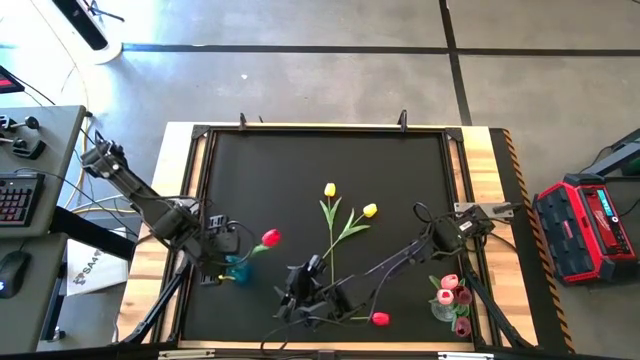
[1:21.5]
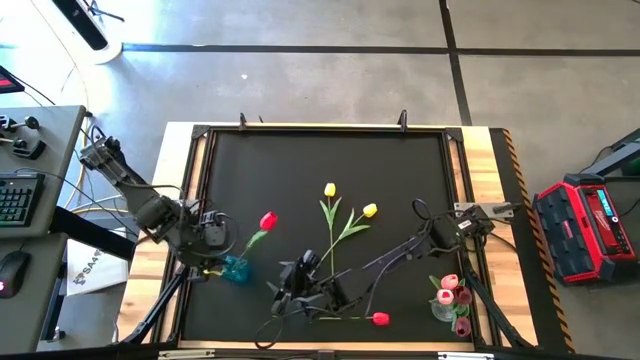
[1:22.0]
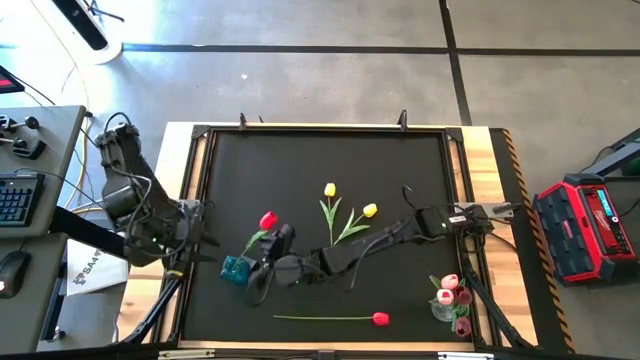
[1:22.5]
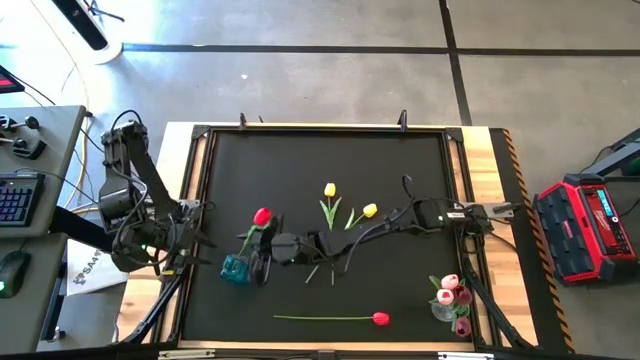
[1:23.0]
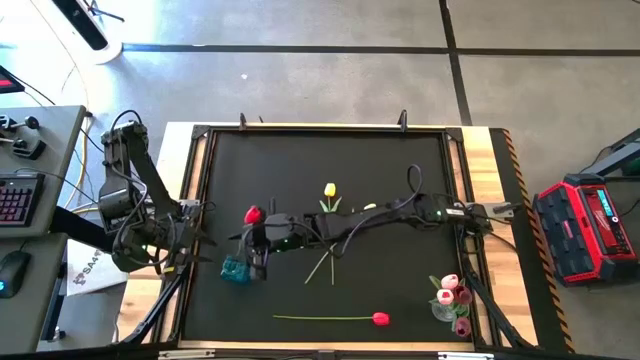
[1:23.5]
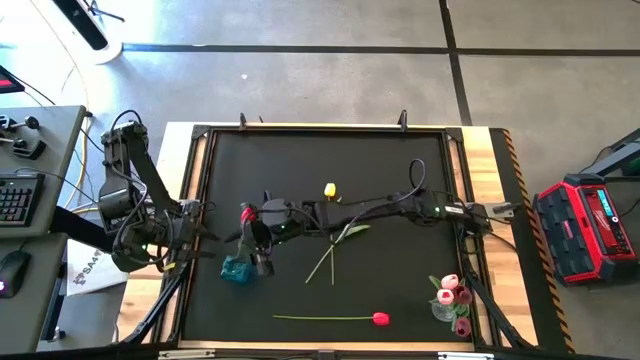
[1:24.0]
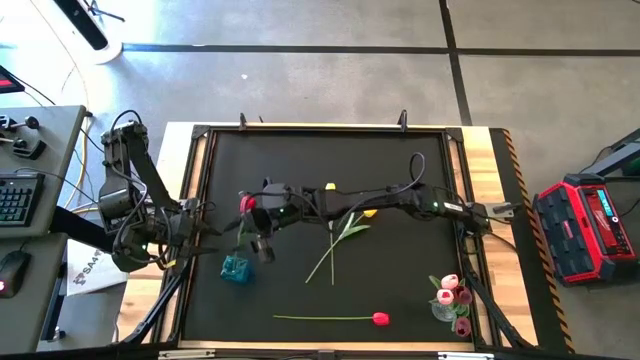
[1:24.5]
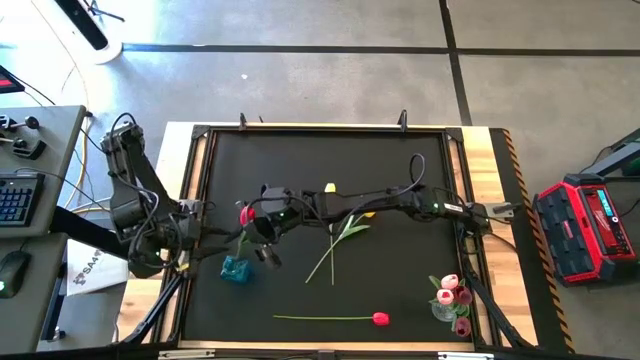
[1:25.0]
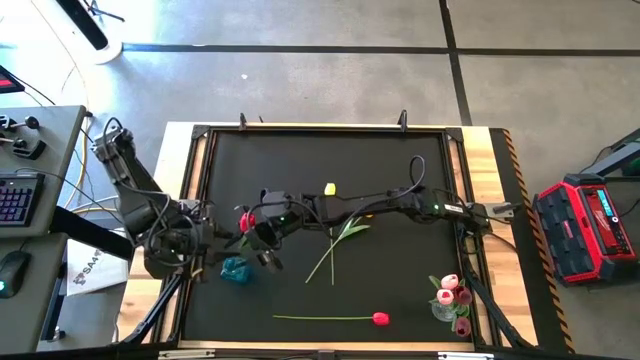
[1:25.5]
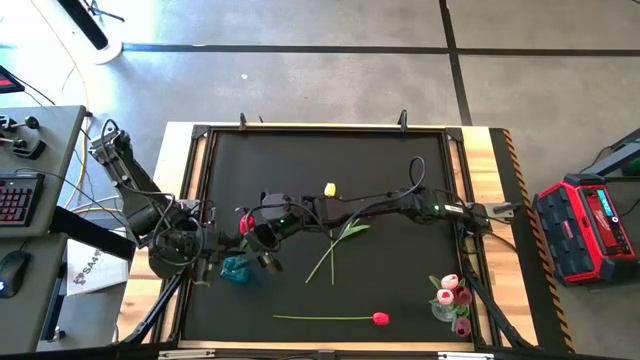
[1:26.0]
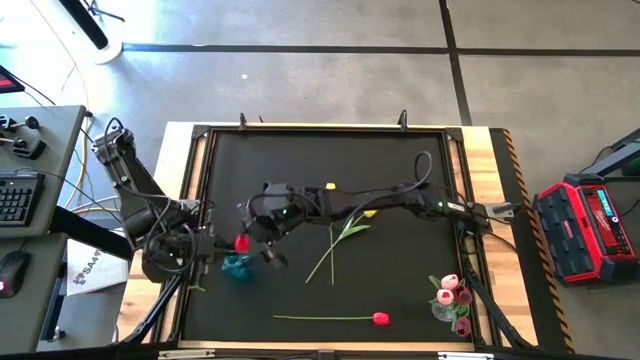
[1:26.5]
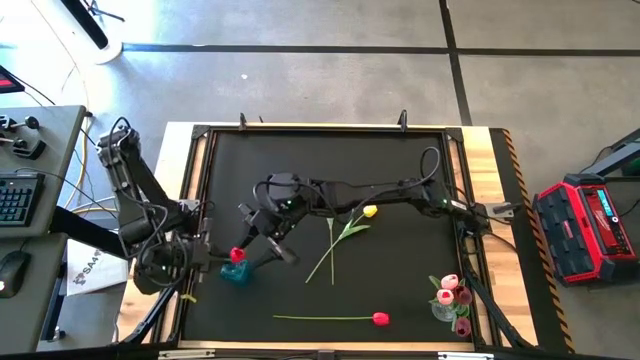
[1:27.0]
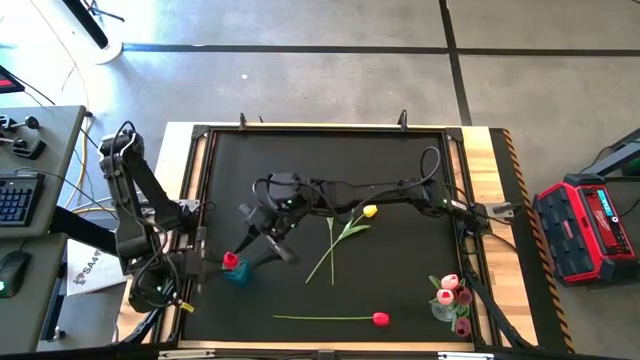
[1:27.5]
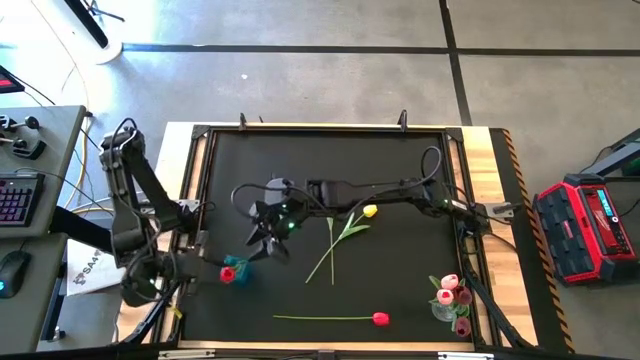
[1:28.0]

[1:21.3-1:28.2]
Task: Sort flowers into vase by color
Adjust the red flower in the vase

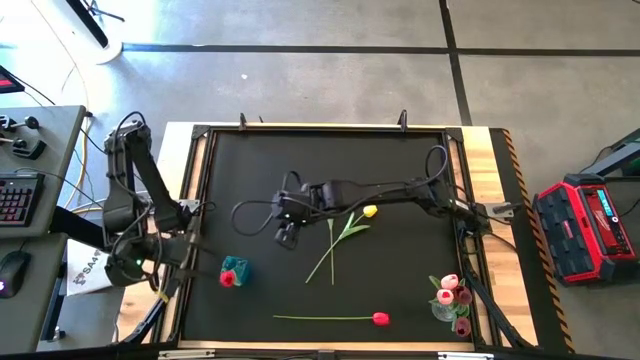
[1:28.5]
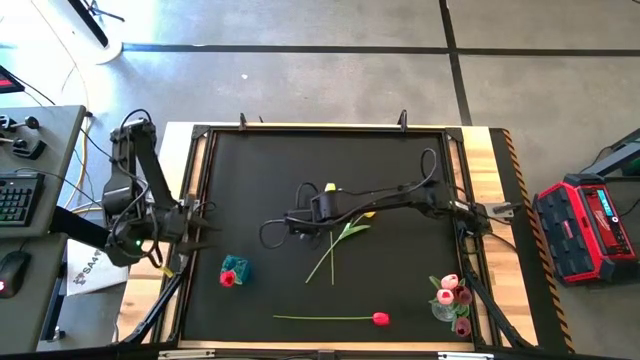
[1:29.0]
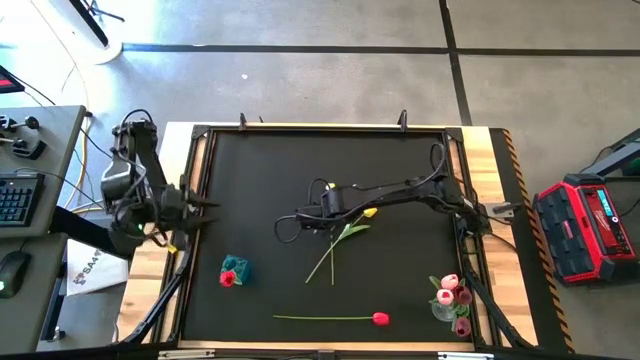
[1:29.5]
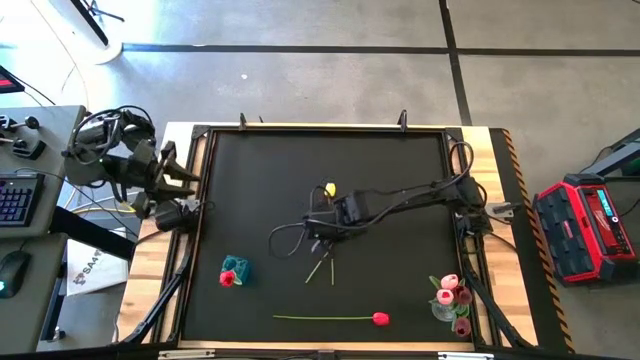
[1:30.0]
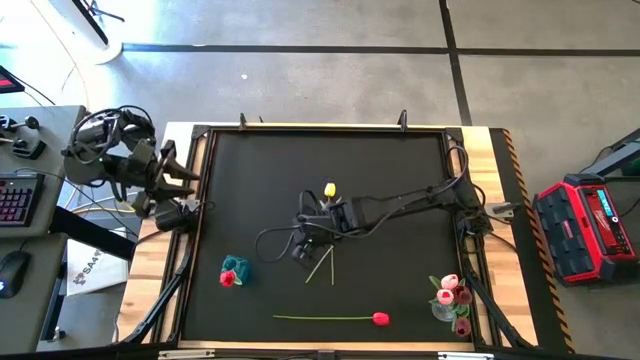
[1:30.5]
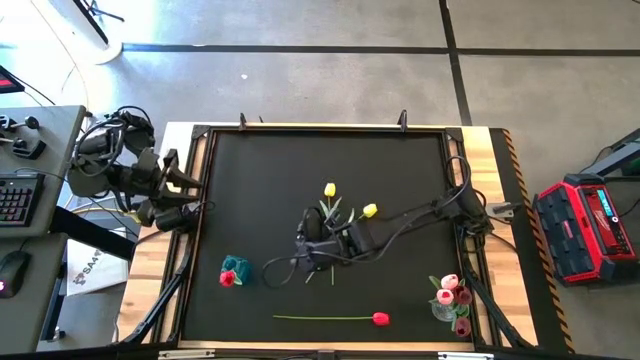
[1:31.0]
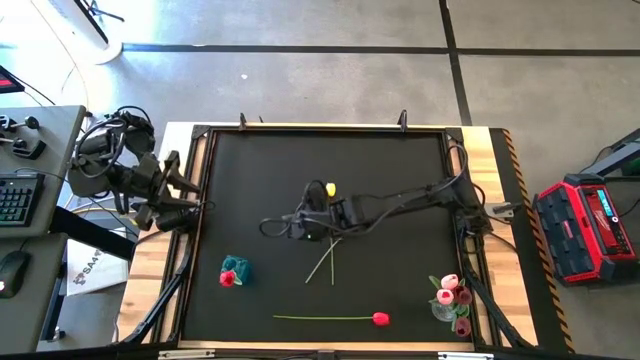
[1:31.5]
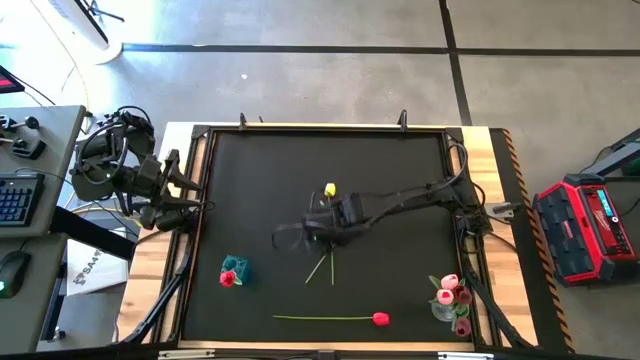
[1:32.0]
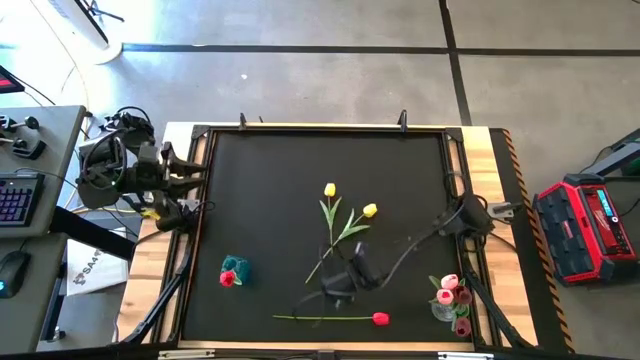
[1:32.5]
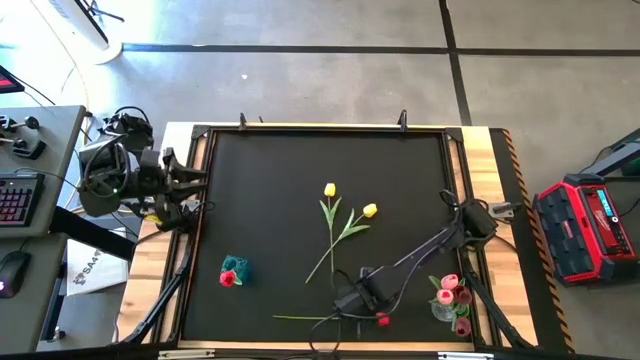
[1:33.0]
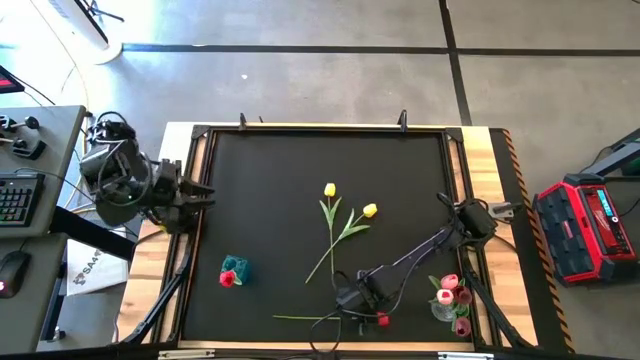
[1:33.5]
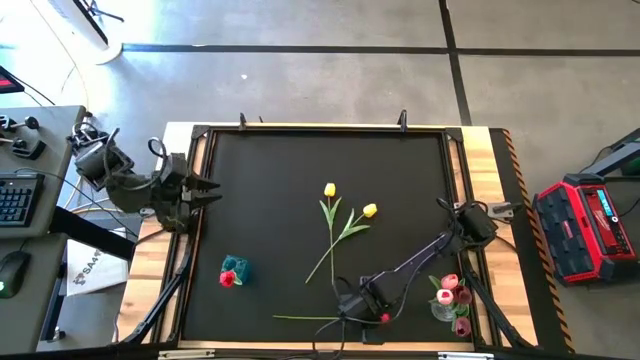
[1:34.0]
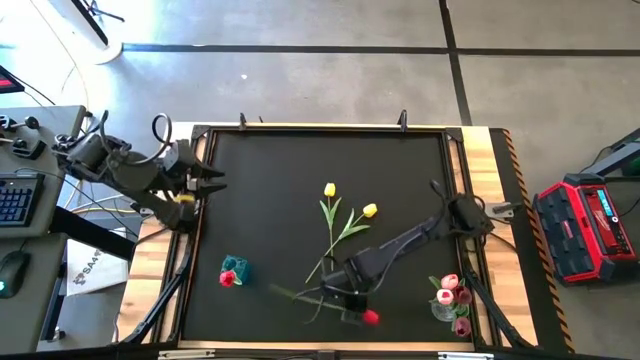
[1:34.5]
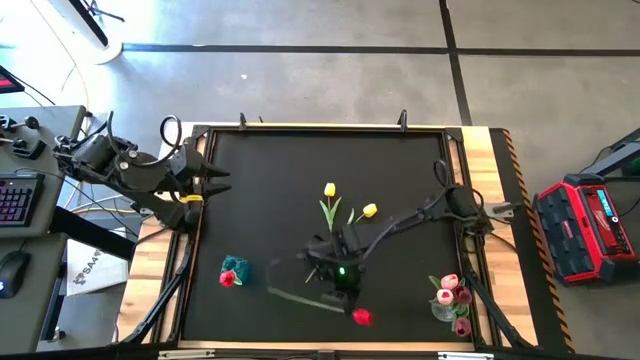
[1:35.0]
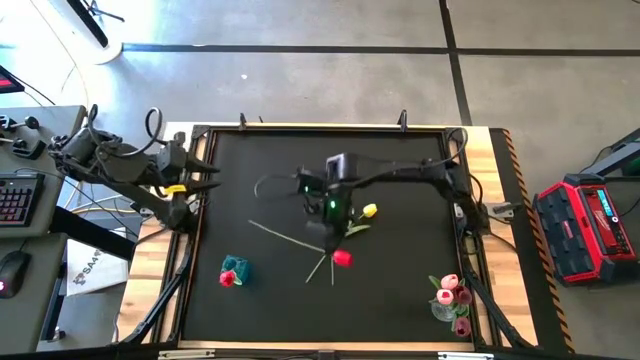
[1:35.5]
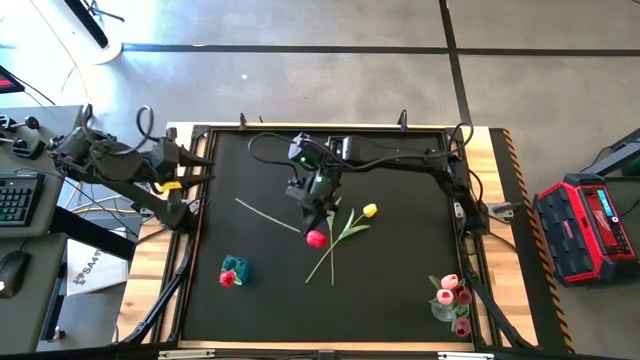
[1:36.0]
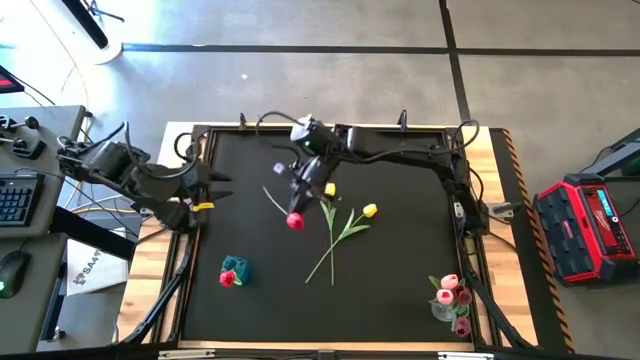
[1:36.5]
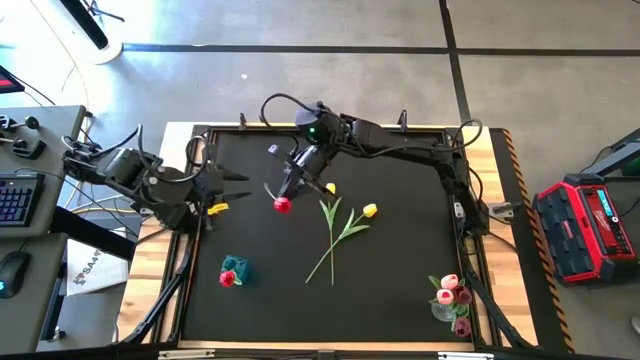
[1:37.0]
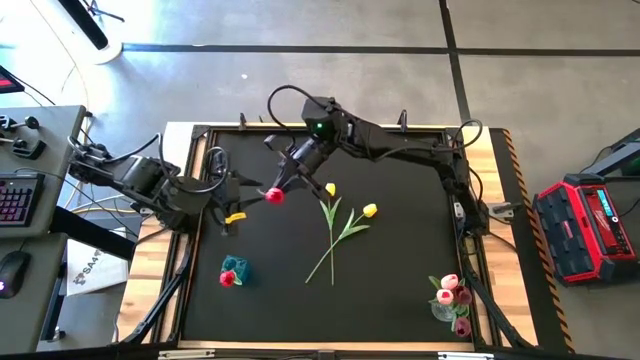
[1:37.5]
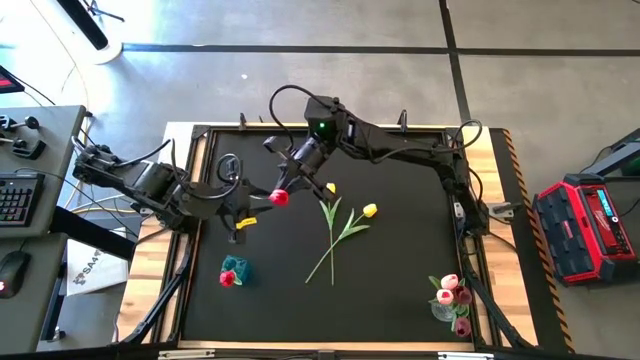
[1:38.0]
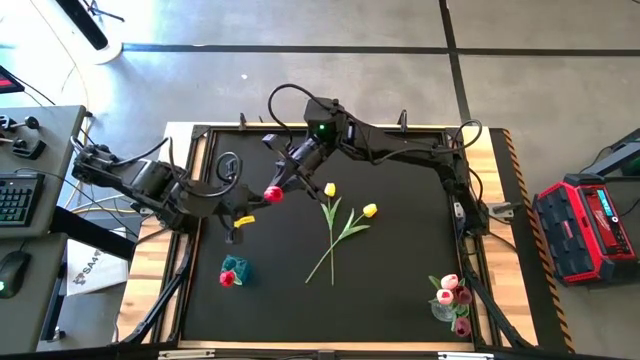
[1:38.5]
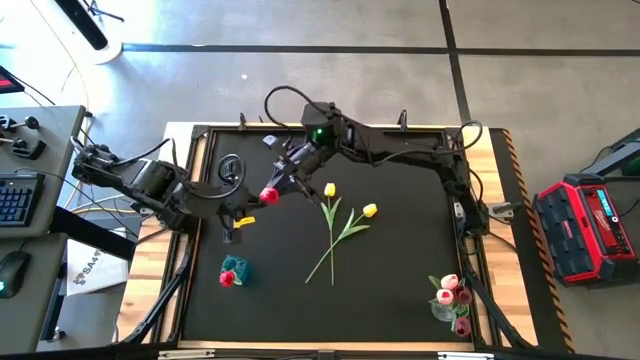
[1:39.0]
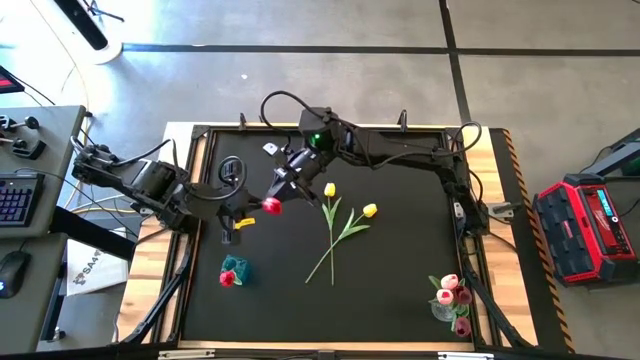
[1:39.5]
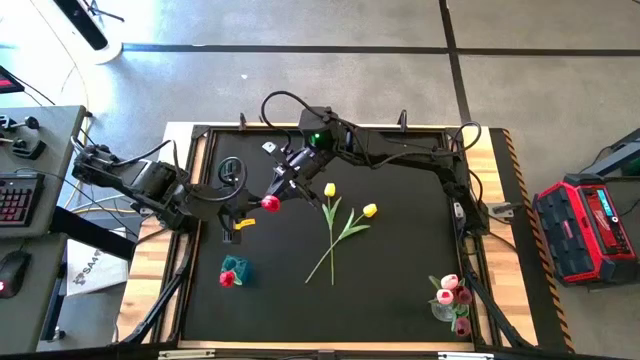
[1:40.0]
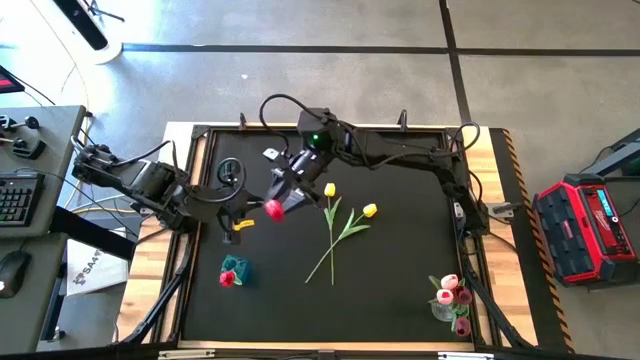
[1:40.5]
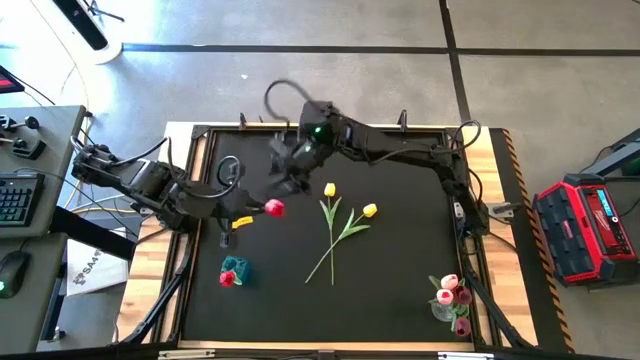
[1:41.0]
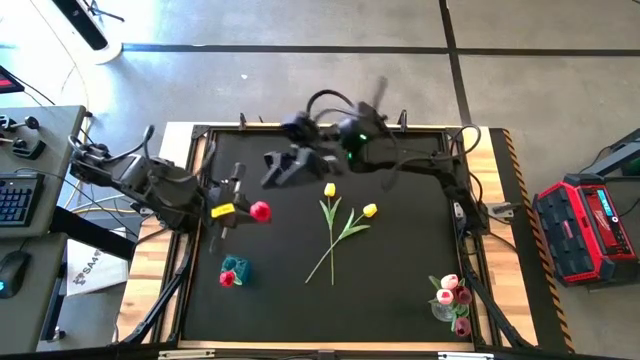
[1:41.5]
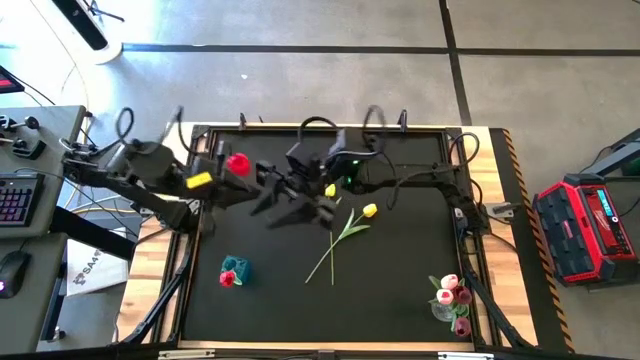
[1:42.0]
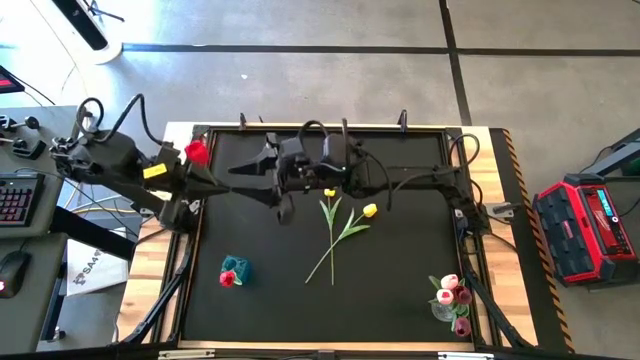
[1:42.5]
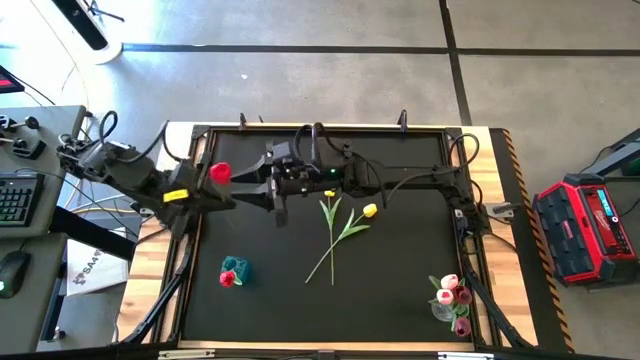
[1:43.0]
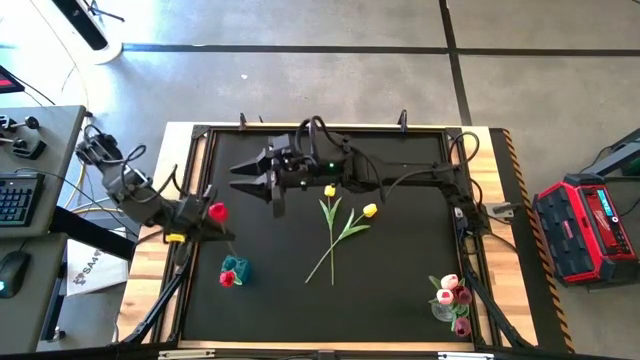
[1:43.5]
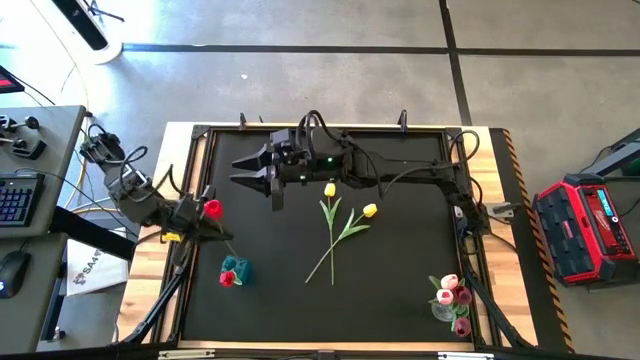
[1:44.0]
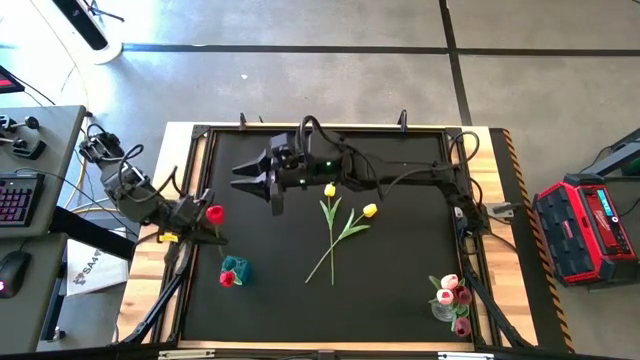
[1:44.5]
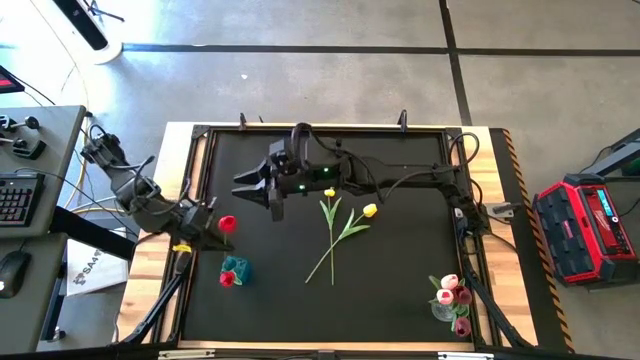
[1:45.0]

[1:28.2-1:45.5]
Put the red flower into the blue vase
